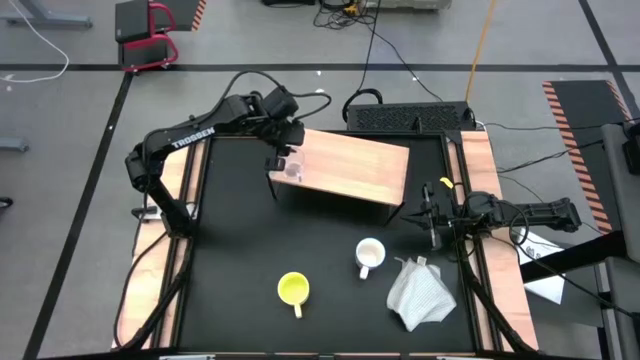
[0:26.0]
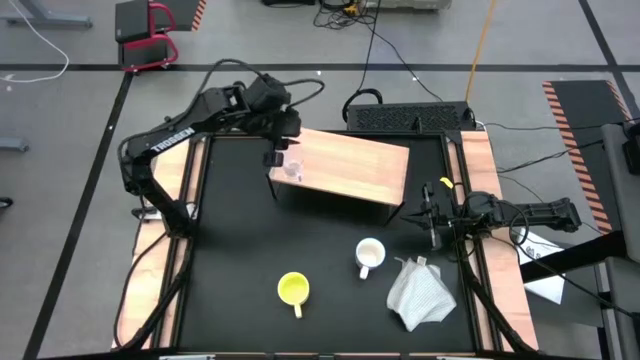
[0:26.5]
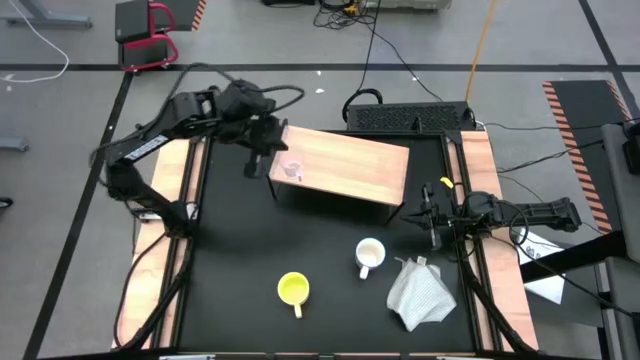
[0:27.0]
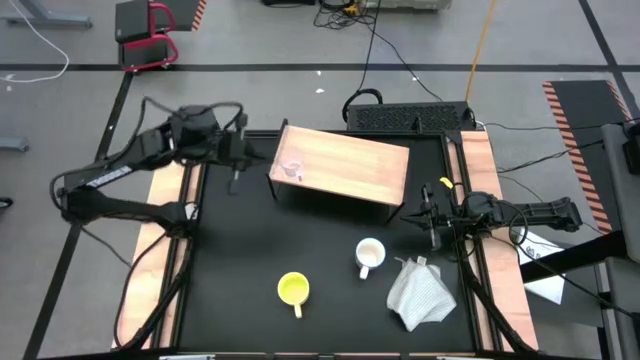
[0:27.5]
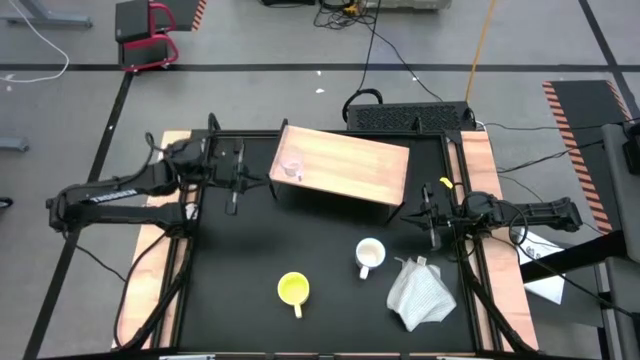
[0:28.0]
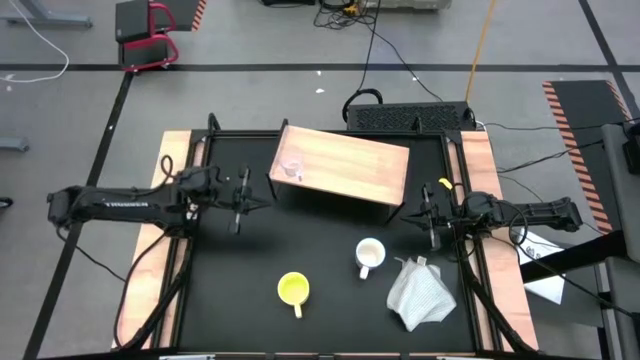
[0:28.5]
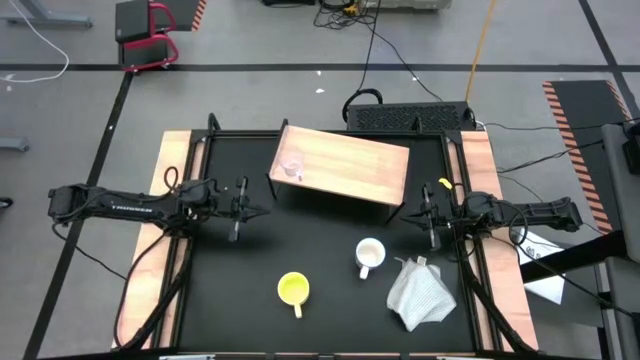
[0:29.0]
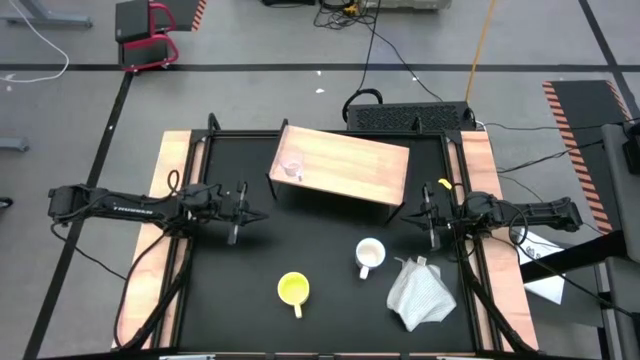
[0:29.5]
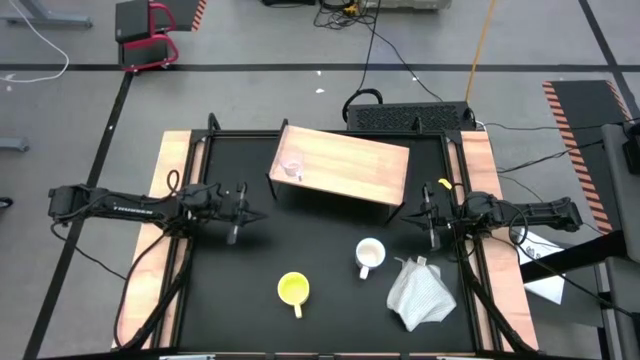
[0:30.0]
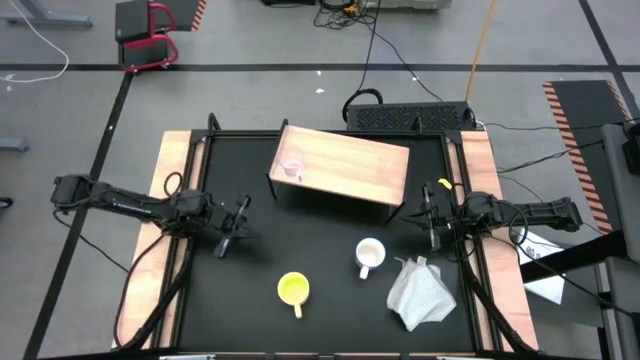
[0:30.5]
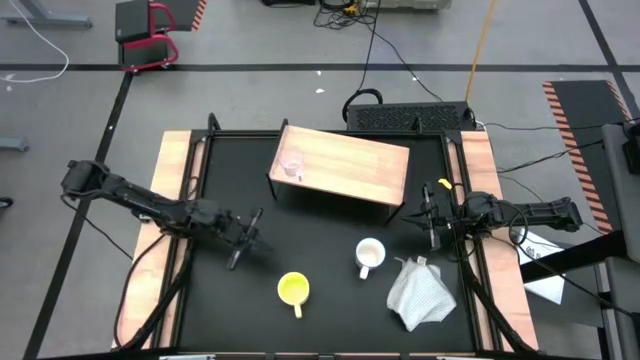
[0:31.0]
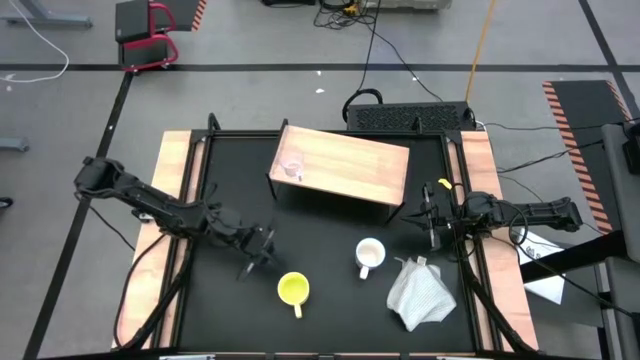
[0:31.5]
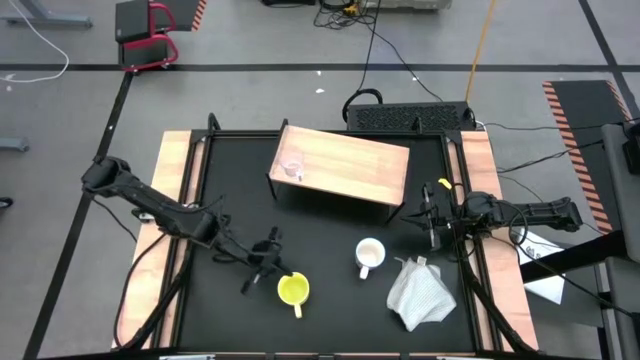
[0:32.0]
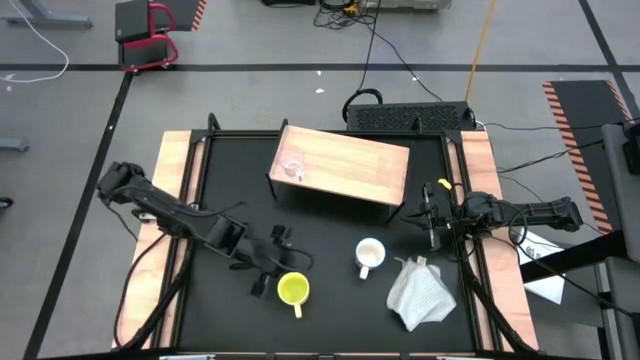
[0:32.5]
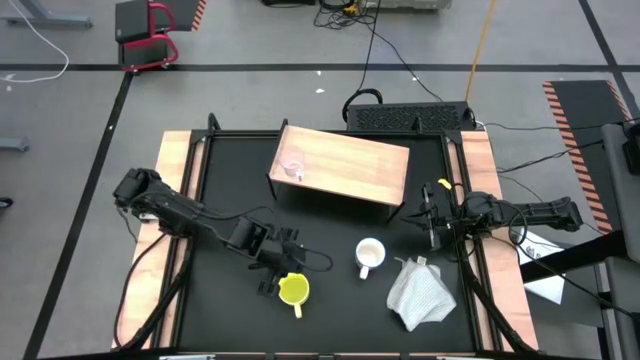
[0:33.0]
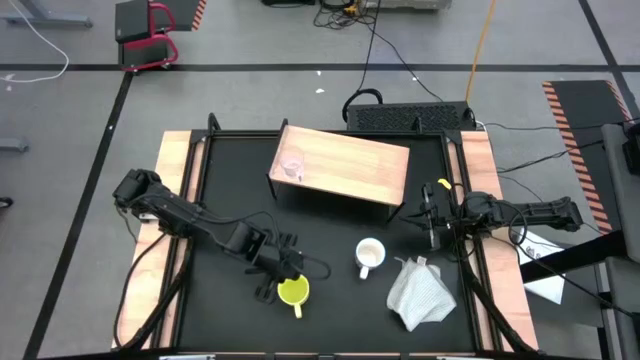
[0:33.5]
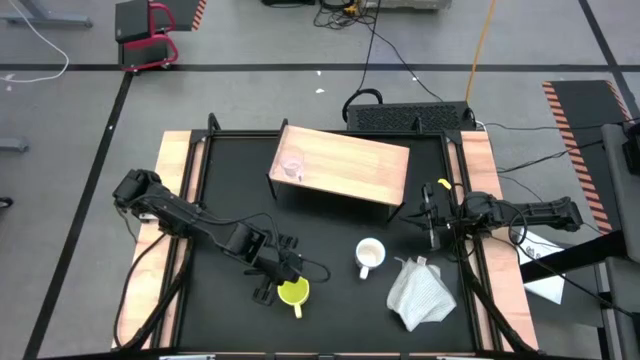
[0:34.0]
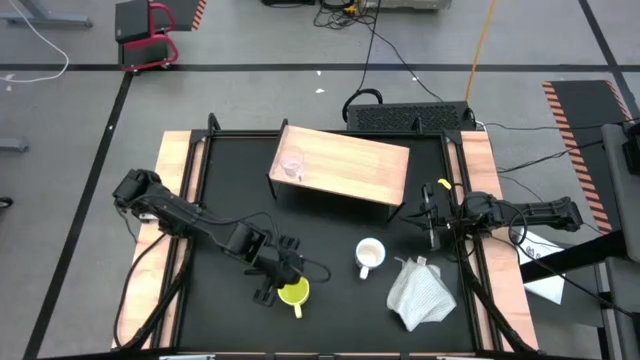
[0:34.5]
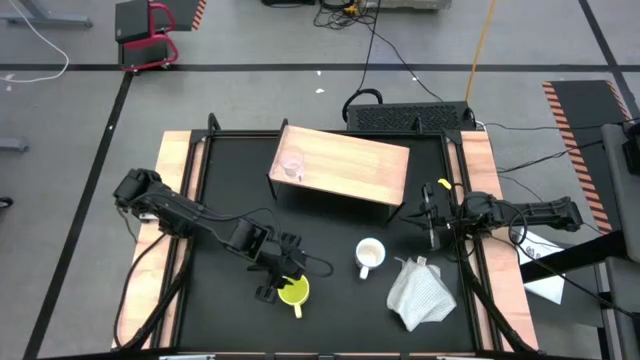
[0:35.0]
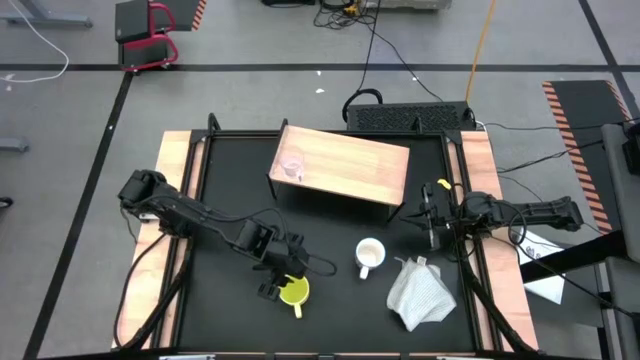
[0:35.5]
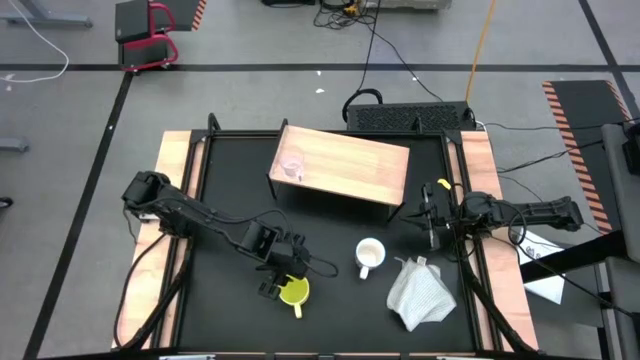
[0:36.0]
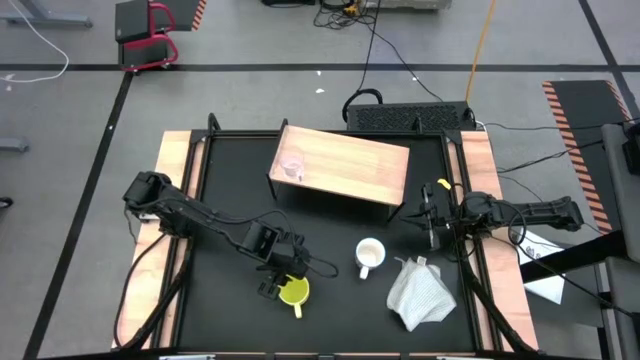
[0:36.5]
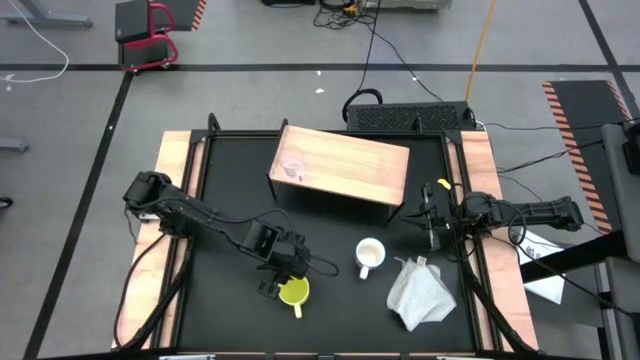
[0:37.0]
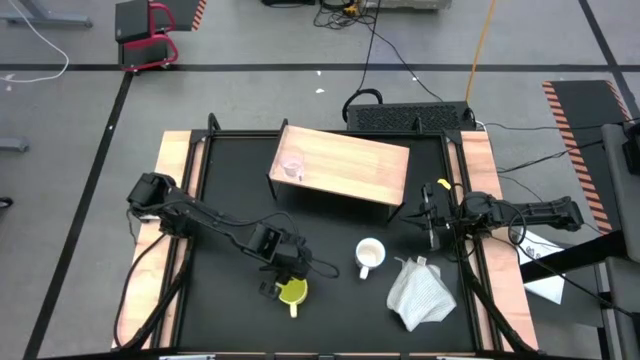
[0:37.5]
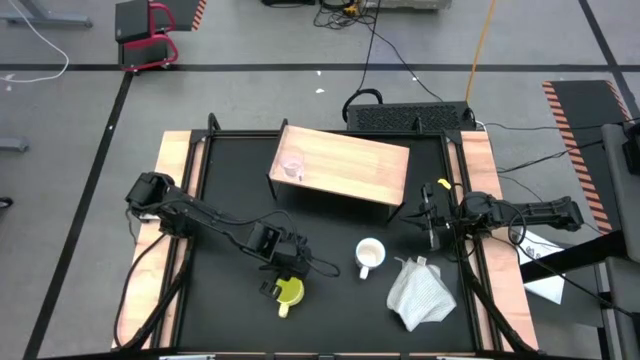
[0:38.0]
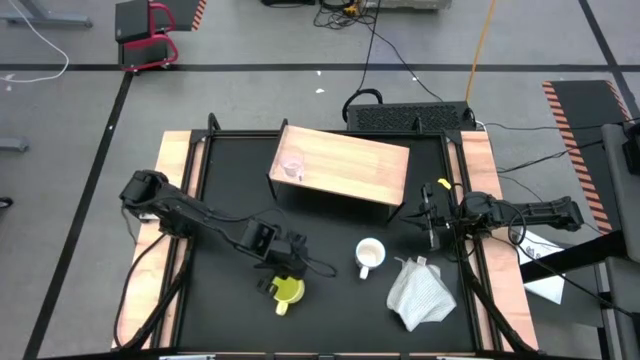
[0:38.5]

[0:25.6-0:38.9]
Task: Stack small to large cups/mugs on shelf
Put the light green mug on the shelf

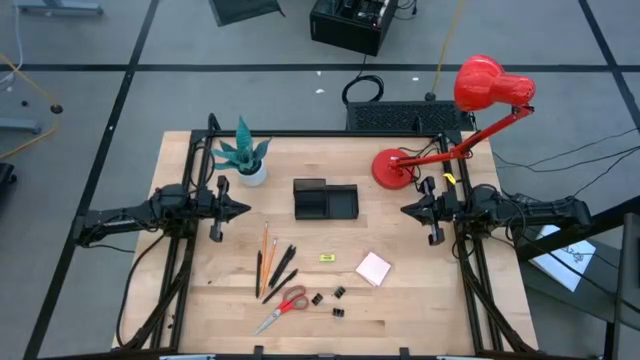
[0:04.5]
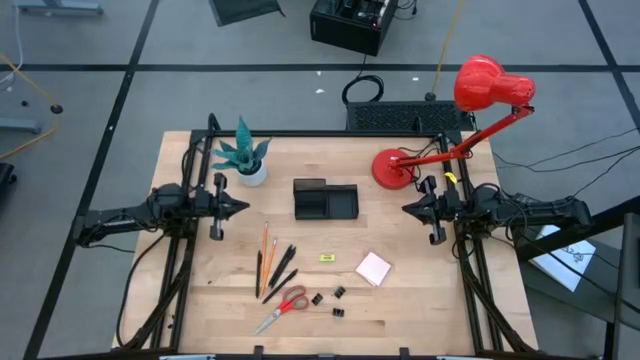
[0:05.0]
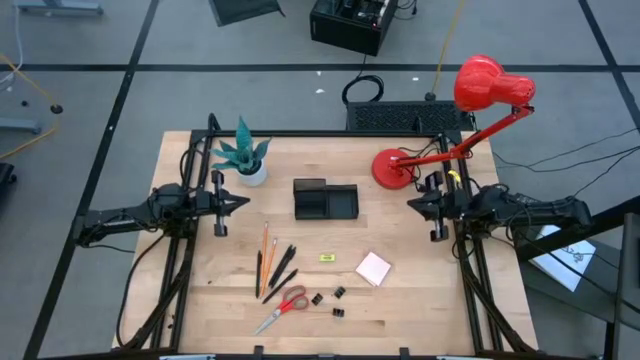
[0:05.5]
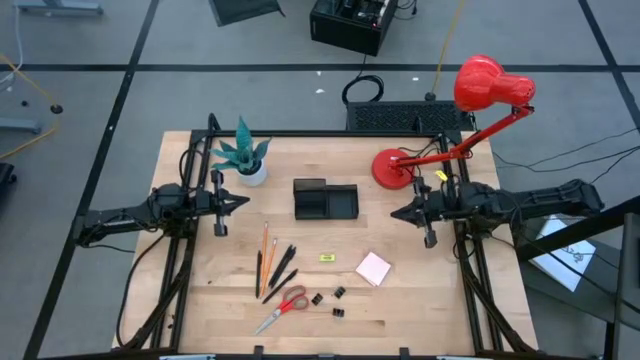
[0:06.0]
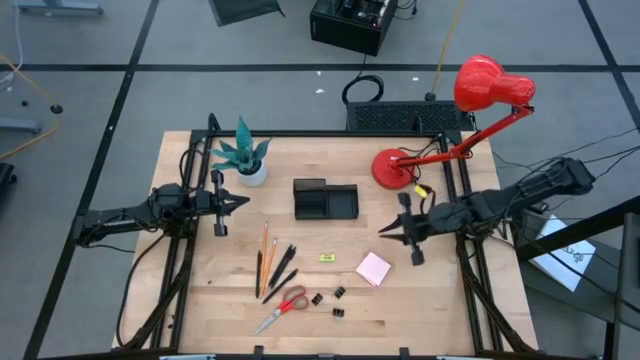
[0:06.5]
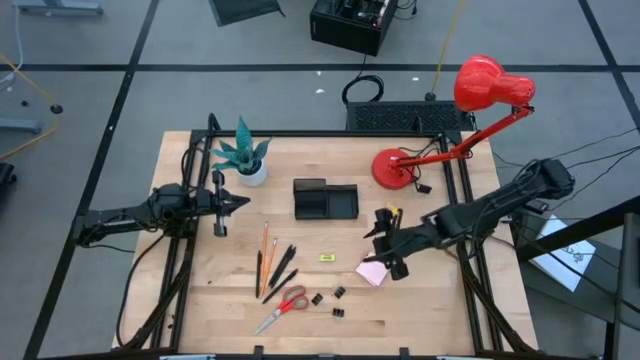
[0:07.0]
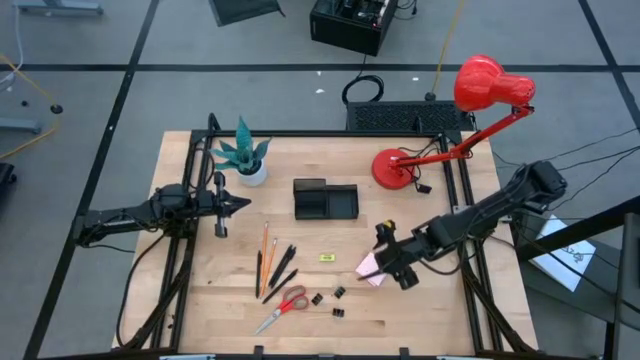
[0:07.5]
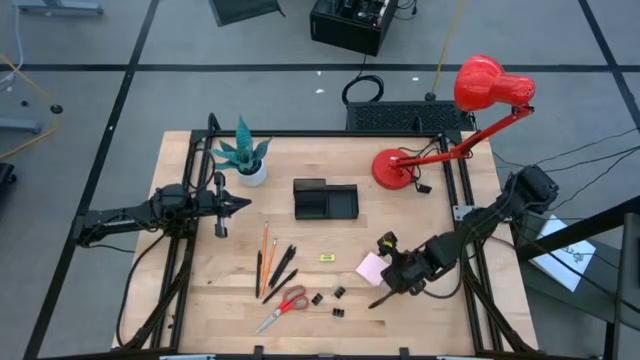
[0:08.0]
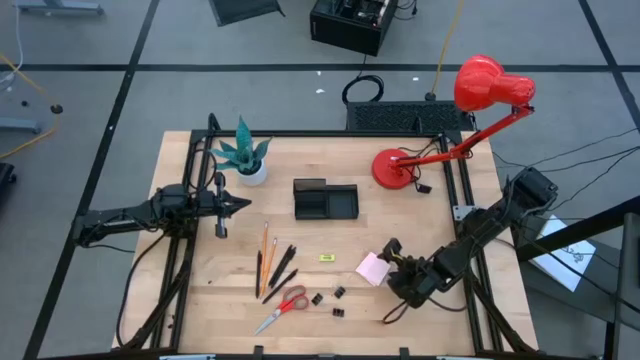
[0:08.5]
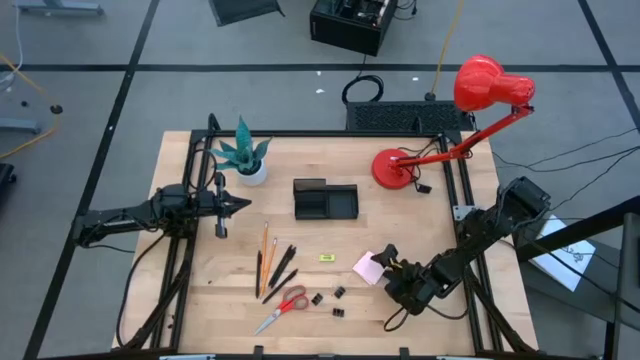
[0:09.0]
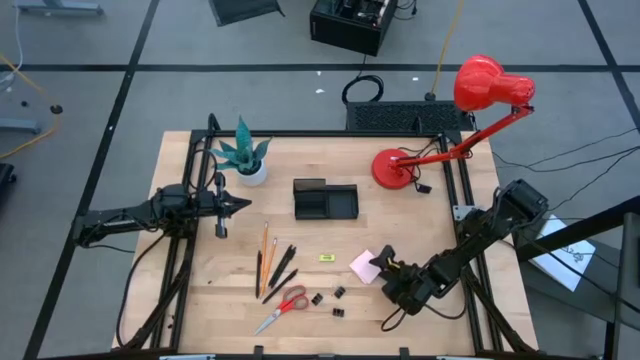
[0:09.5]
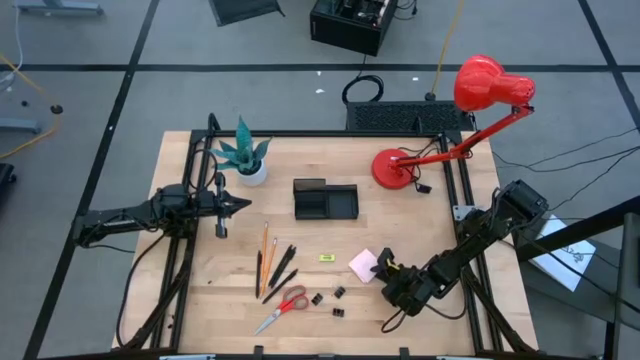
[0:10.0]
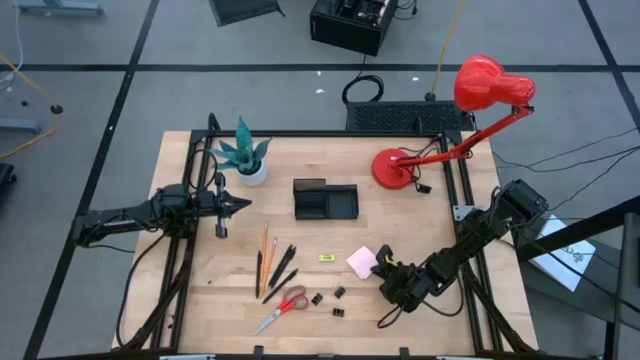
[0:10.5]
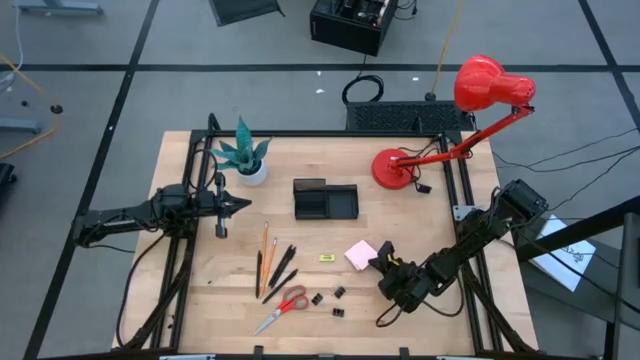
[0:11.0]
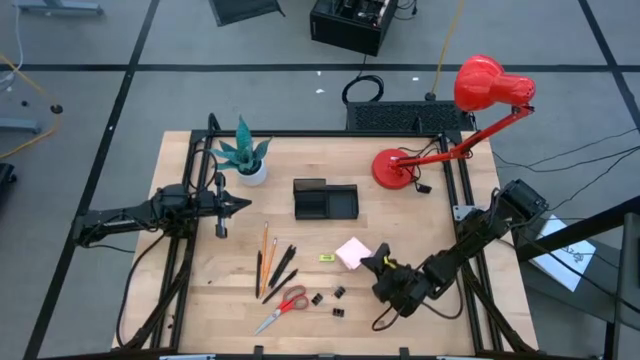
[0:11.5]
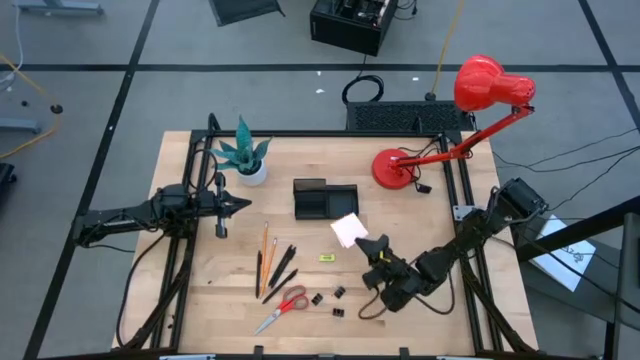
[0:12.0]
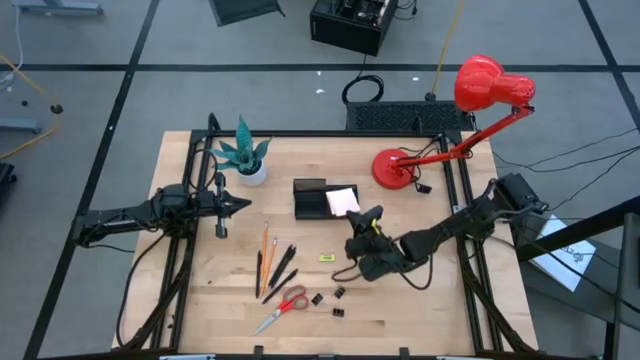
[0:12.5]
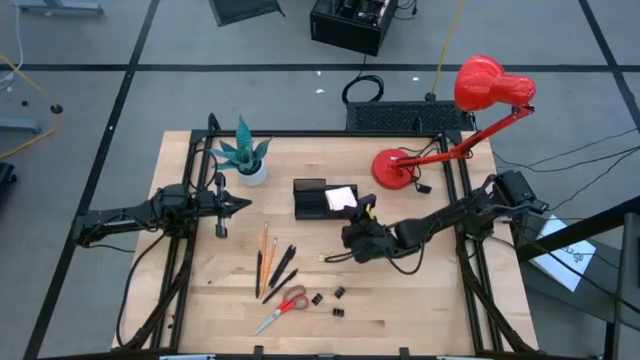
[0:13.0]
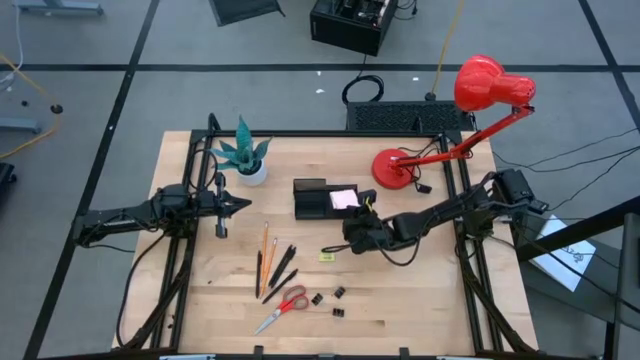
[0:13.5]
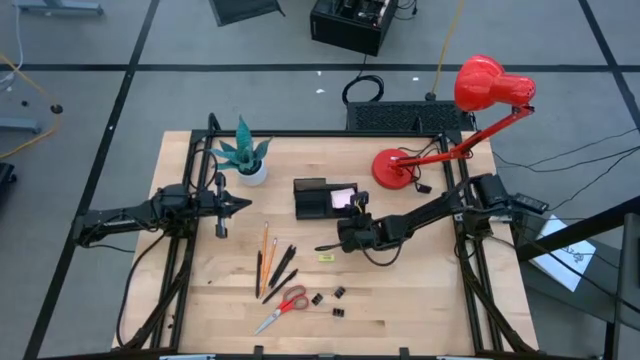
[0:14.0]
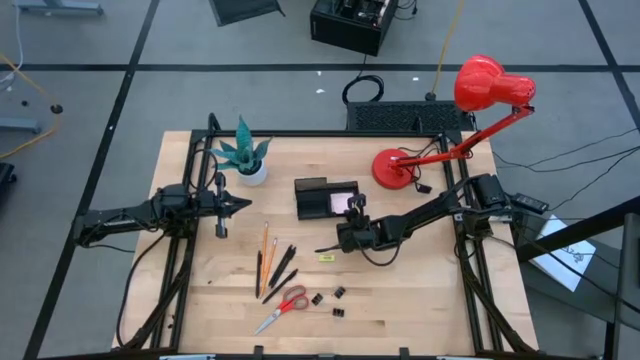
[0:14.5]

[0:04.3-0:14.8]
Task: Pick and place office supplies into organizer
Put the pink sticky note the black desk organizer
